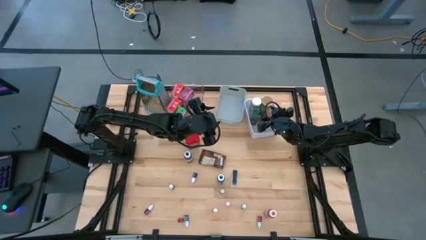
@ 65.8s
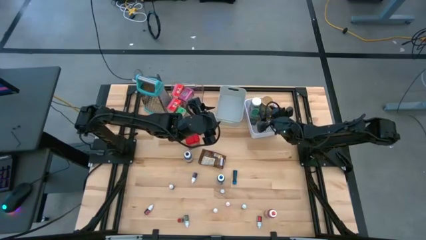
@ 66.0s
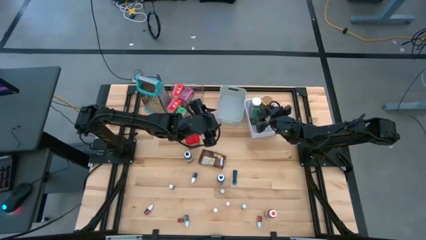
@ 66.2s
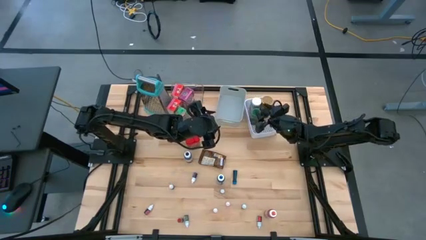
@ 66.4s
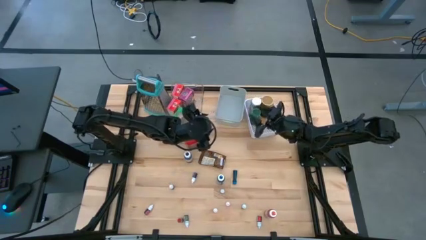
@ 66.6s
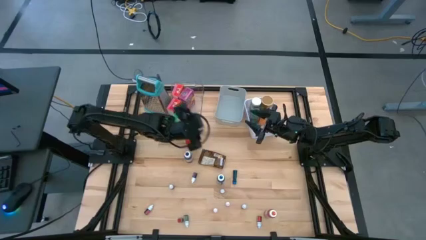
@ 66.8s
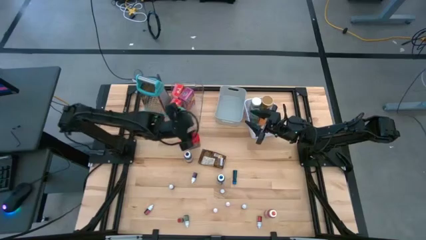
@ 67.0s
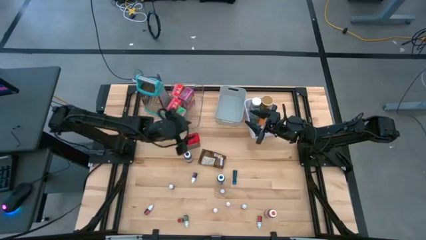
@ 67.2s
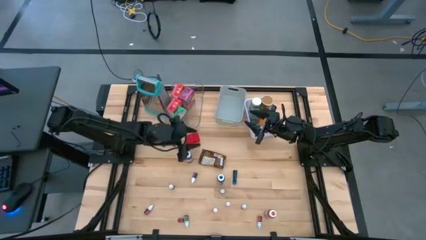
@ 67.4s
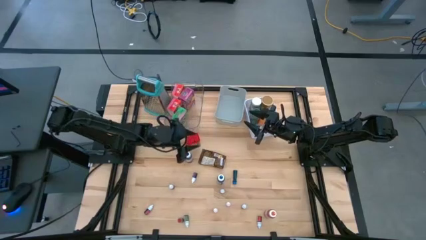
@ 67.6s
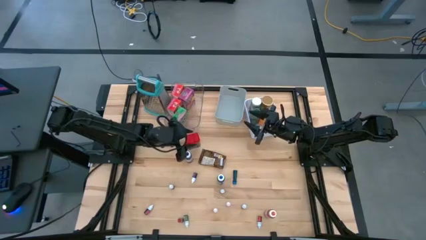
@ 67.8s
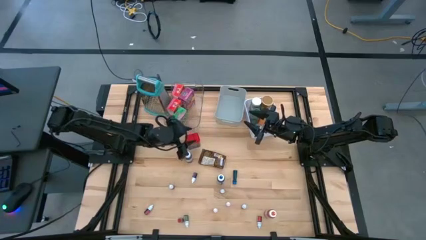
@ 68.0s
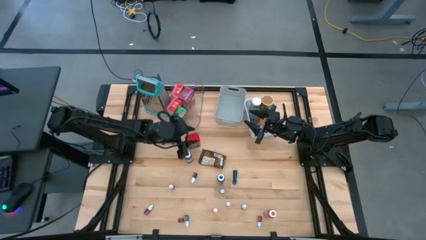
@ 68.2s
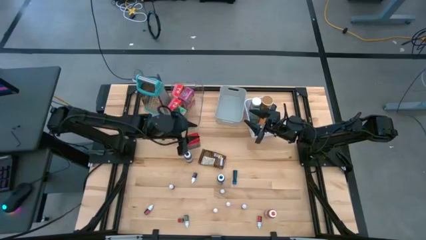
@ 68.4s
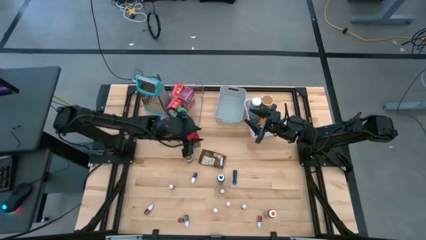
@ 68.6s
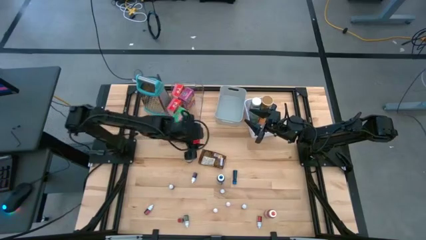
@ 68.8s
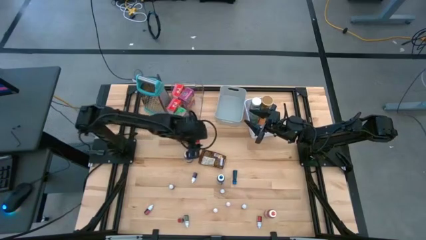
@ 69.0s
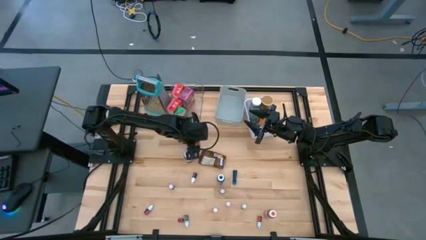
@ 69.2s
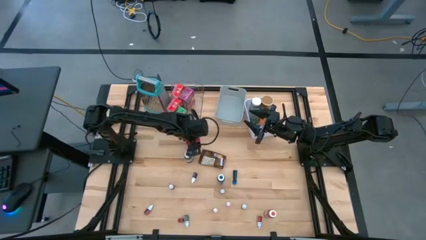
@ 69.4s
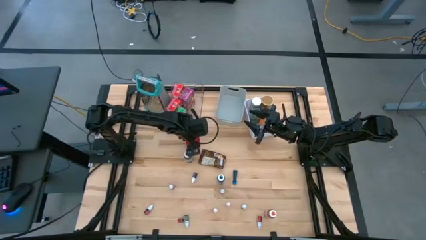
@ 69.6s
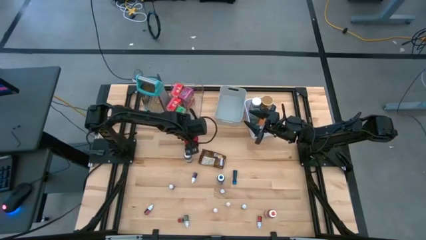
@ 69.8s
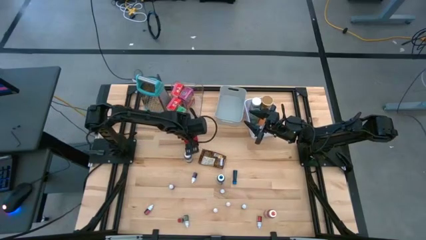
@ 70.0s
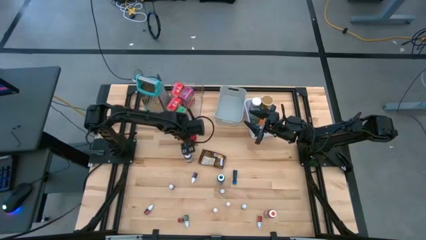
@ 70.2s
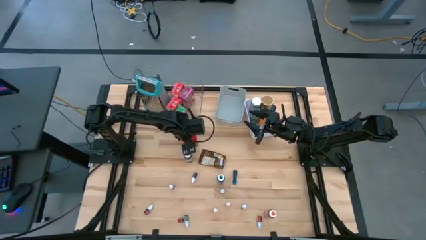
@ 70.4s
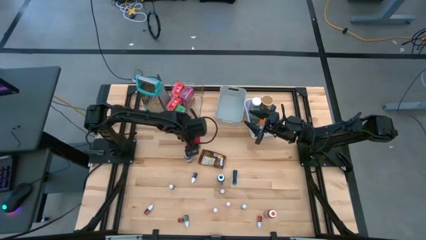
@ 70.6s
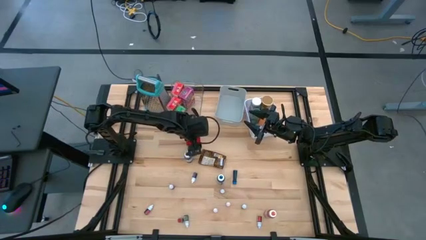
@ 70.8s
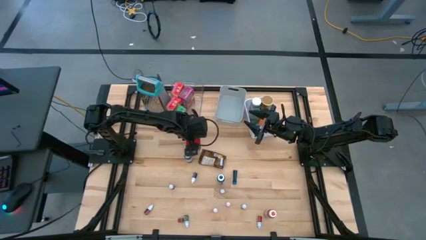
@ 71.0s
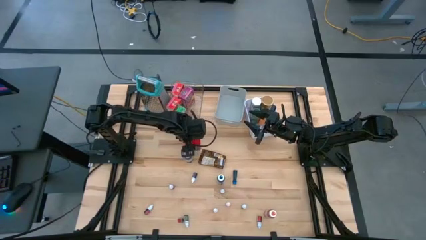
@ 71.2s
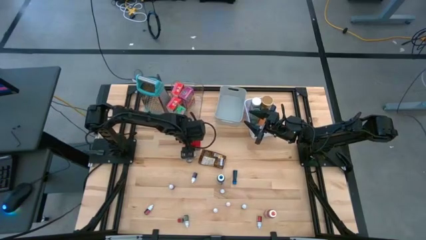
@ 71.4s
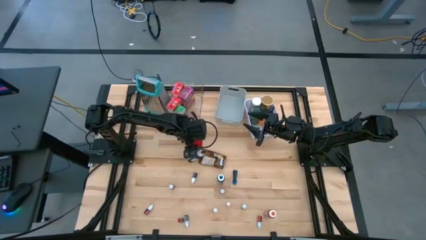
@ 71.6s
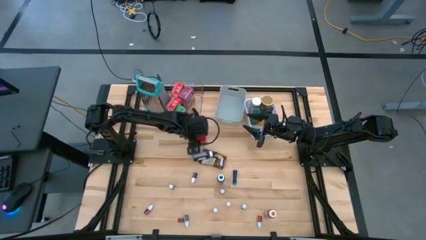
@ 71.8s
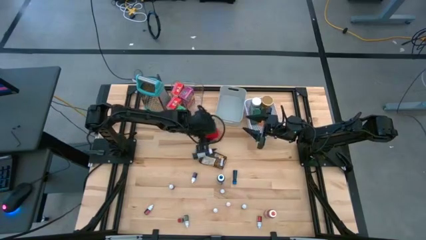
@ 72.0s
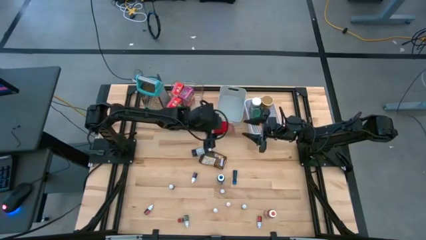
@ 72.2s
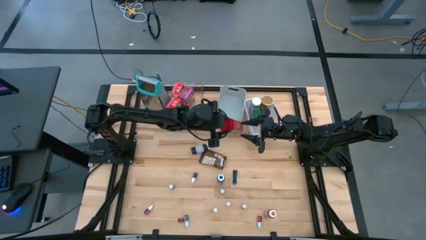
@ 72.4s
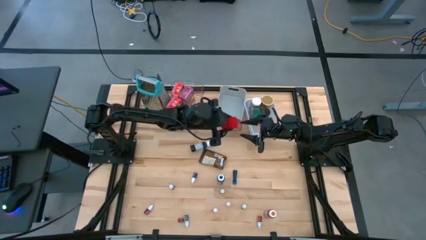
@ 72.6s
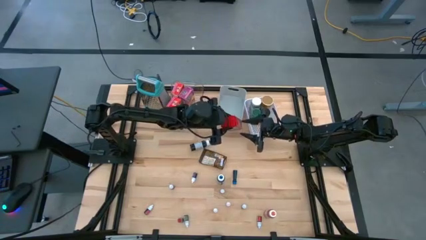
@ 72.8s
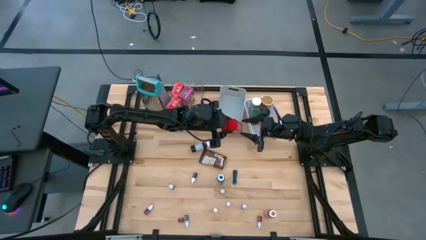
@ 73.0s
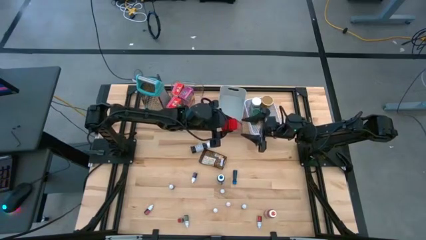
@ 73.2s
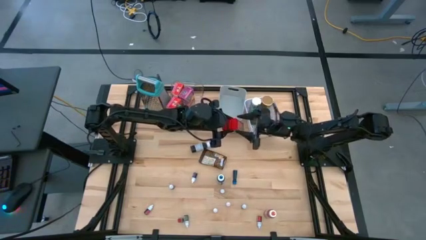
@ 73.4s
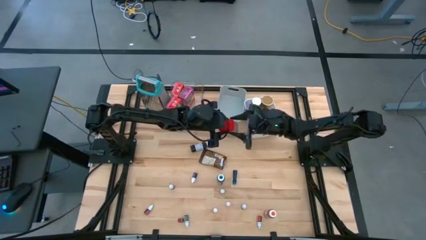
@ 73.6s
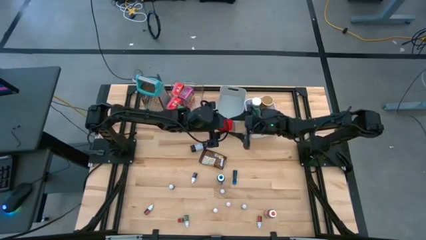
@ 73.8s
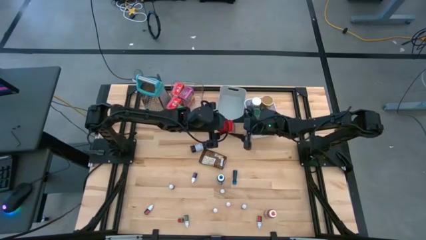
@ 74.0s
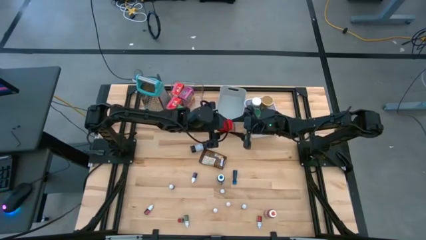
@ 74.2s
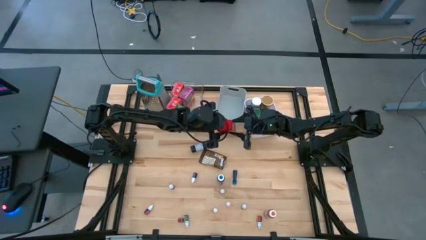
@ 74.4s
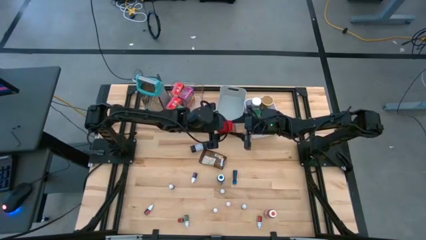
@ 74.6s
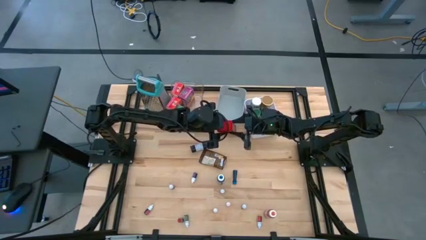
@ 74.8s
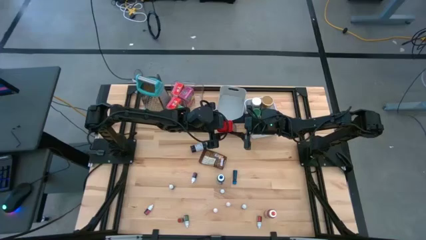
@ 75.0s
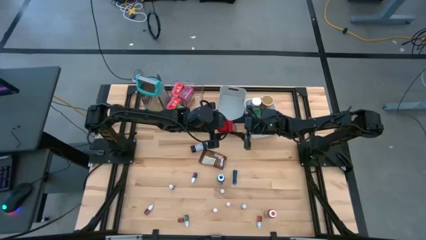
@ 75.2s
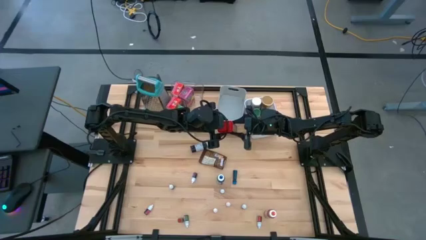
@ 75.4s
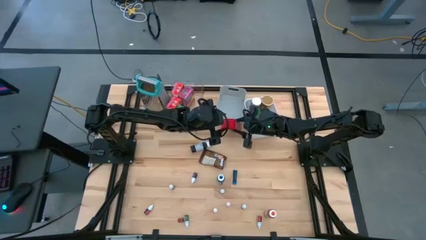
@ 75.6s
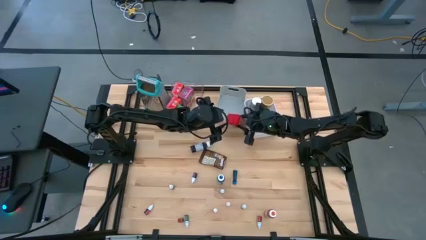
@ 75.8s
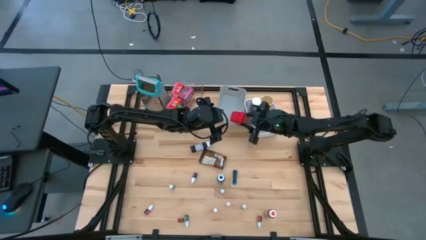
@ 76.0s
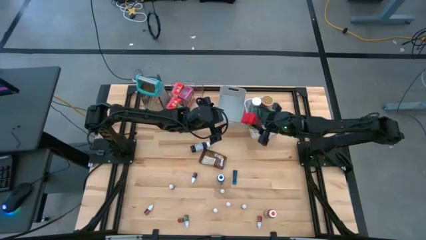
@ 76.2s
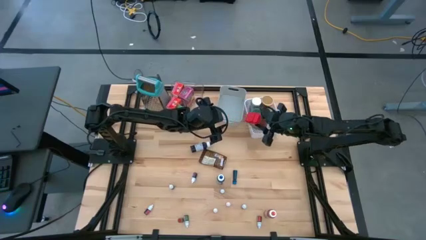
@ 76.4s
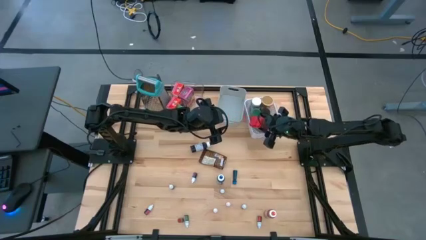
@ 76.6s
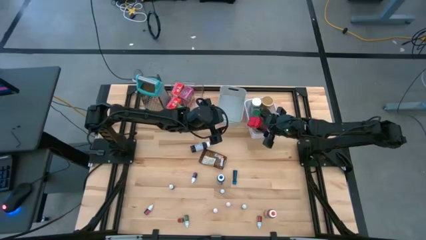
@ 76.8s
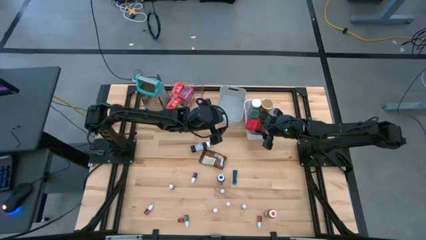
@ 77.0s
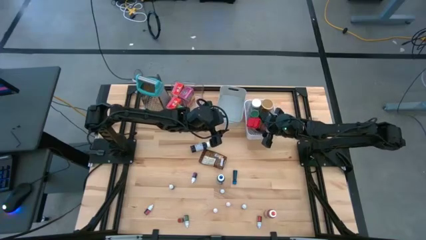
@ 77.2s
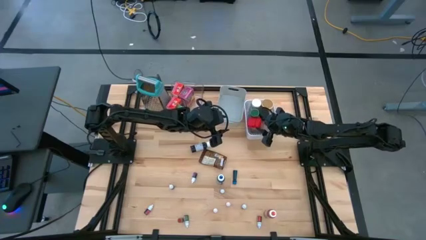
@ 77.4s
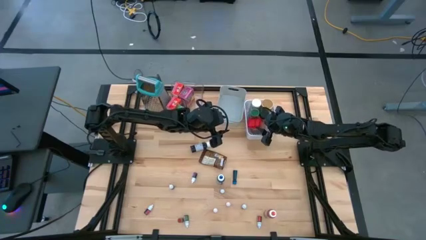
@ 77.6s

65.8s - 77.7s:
Task: Pick & Place Kitchen Items
Put the red spice can into the white bin

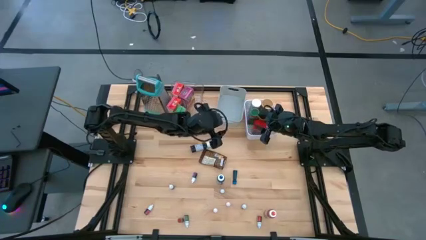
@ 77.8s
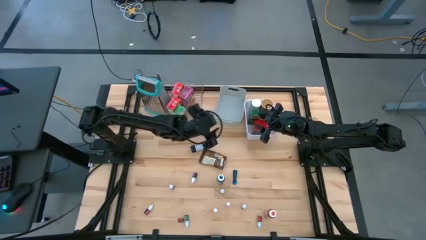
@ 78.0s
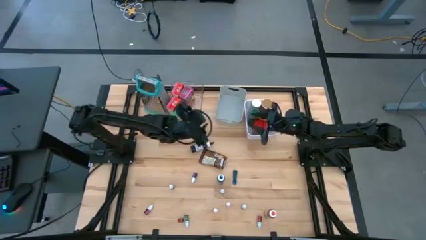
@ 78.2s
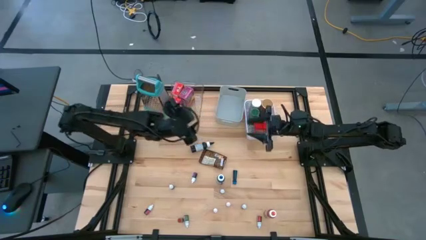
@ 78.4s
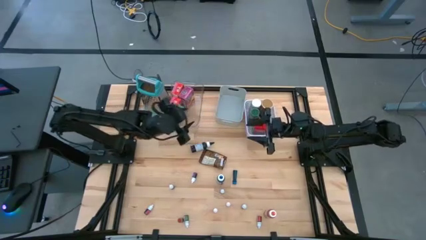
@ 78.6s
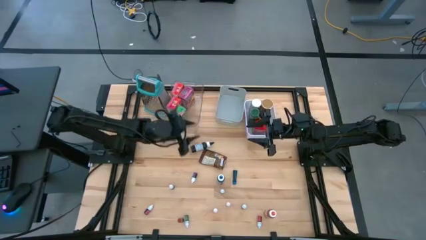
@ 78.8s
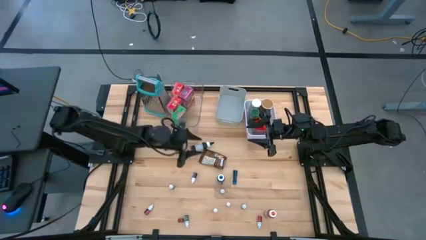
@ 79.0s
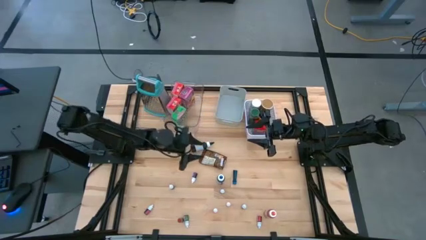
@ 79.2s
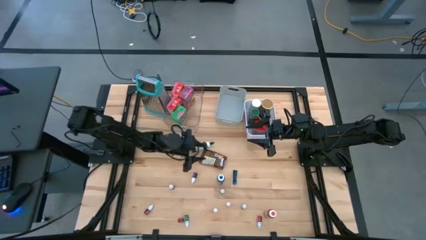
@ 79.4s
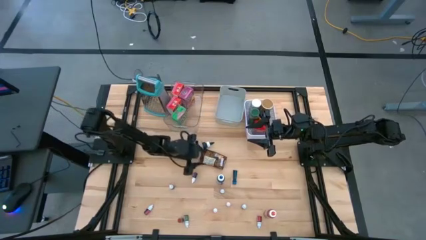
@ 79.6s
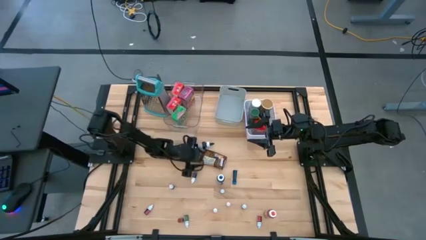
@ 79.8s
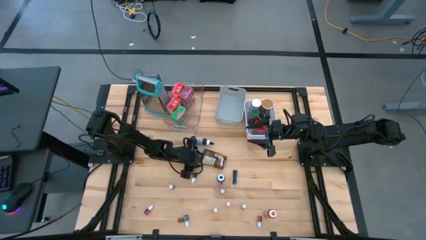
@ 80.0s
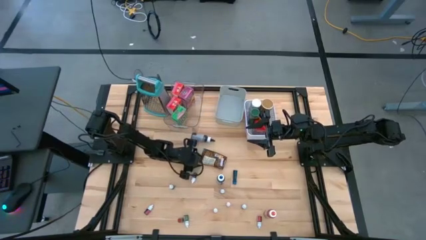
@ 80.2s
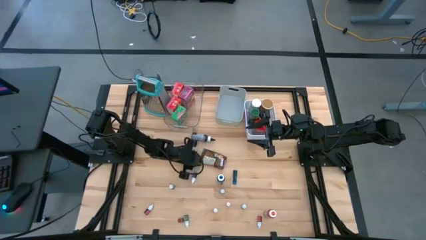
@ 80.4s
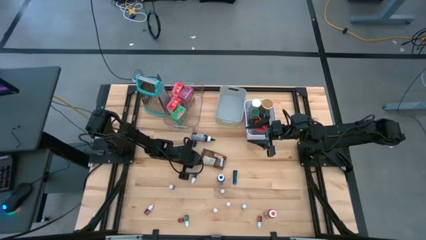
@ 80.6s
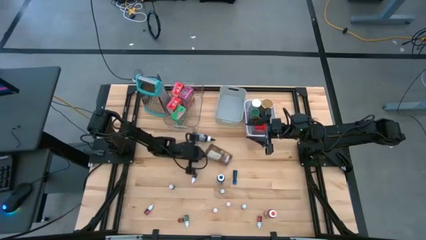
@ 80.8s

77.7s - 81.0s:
Put the orange spice pack into the white bin
